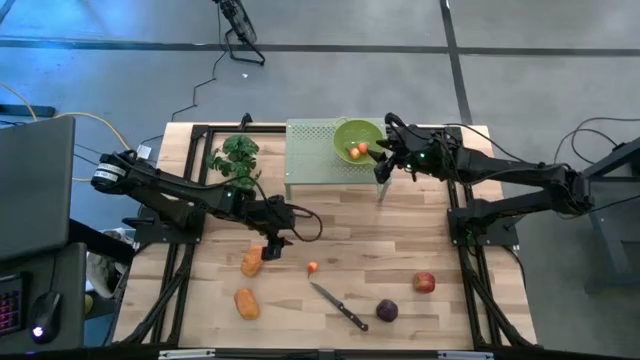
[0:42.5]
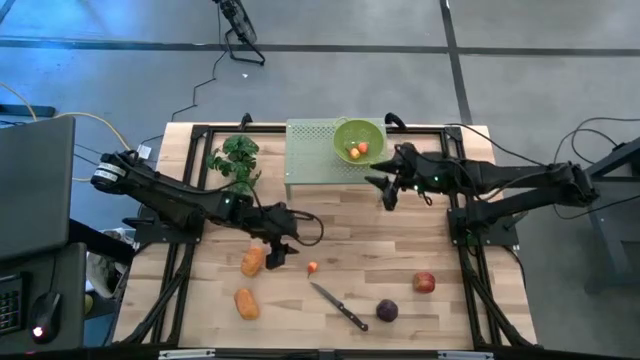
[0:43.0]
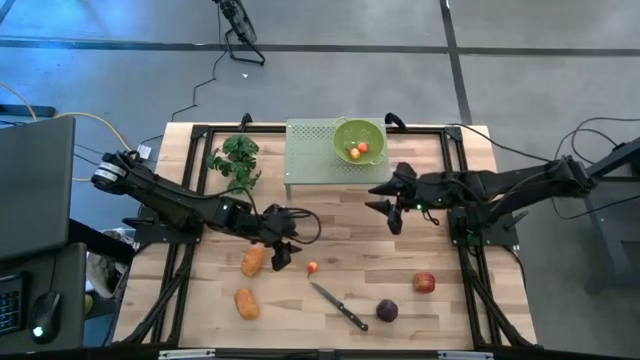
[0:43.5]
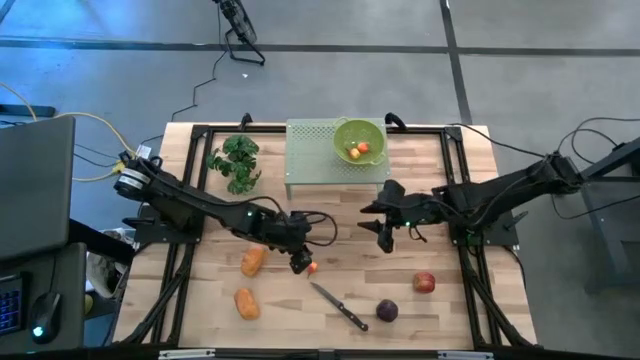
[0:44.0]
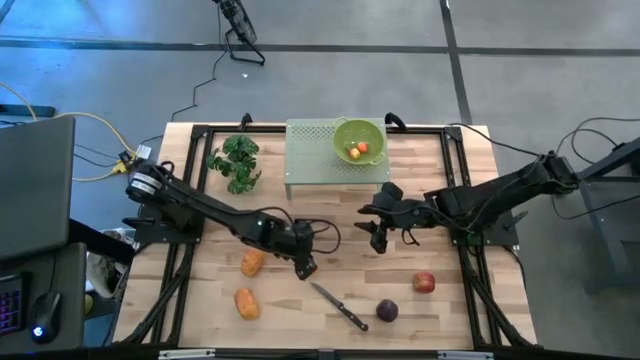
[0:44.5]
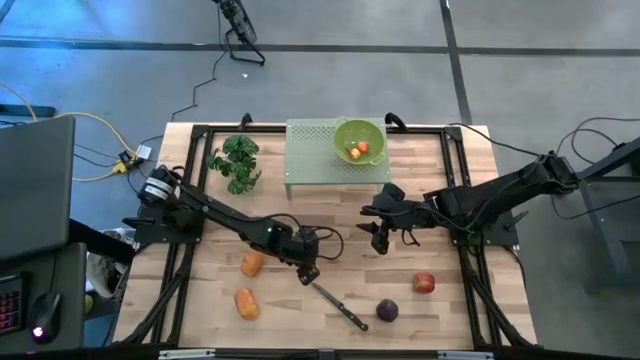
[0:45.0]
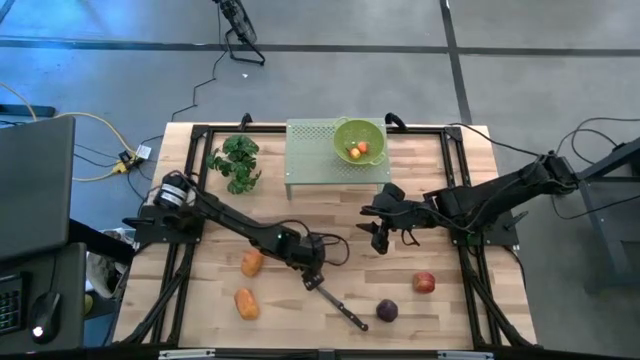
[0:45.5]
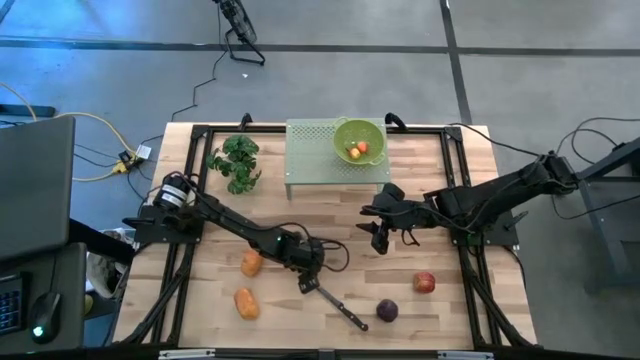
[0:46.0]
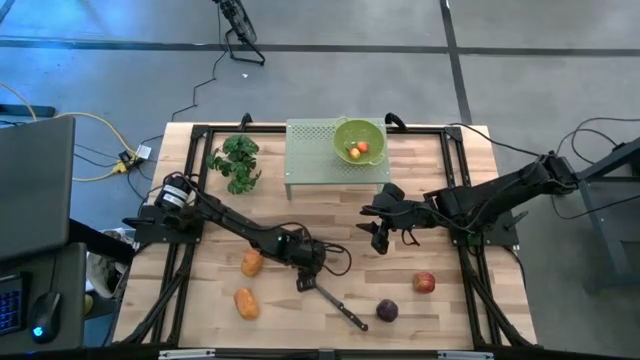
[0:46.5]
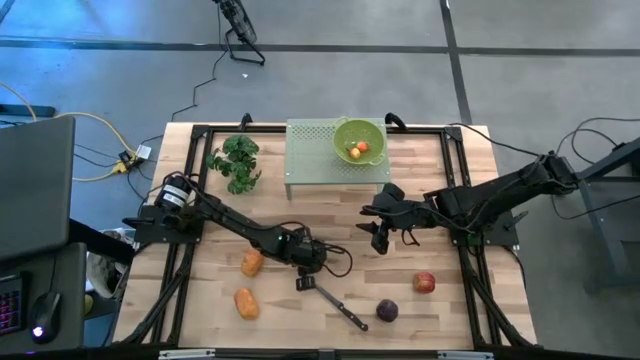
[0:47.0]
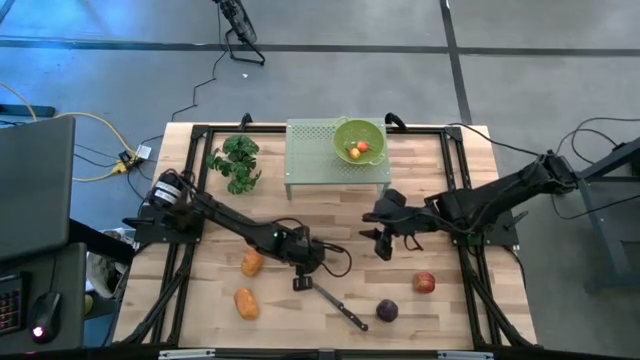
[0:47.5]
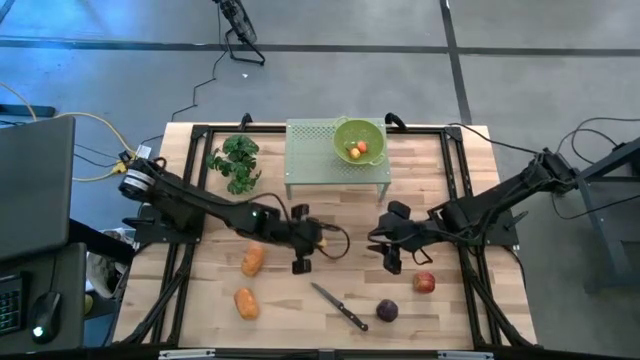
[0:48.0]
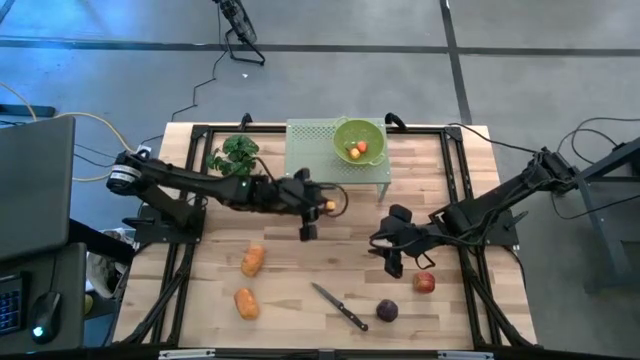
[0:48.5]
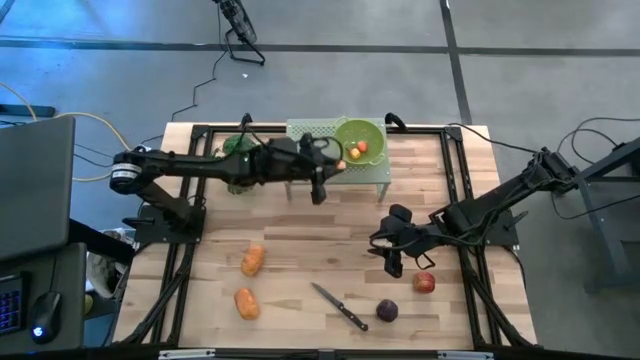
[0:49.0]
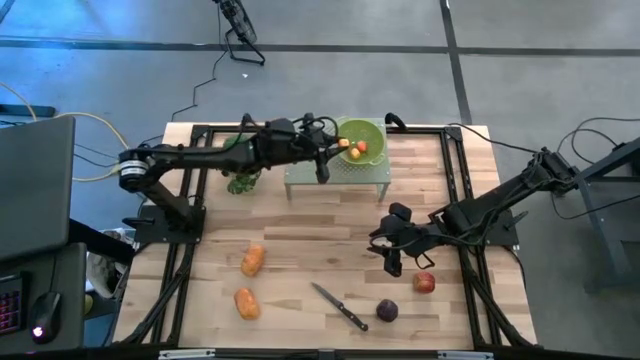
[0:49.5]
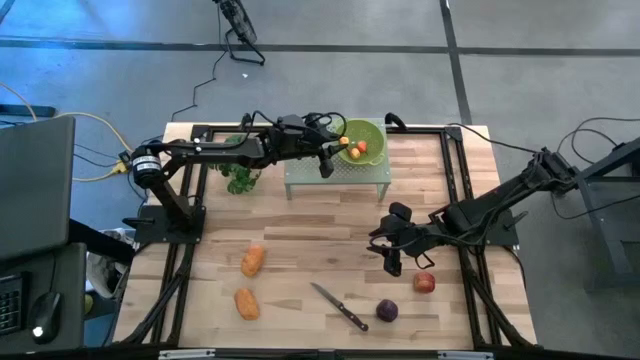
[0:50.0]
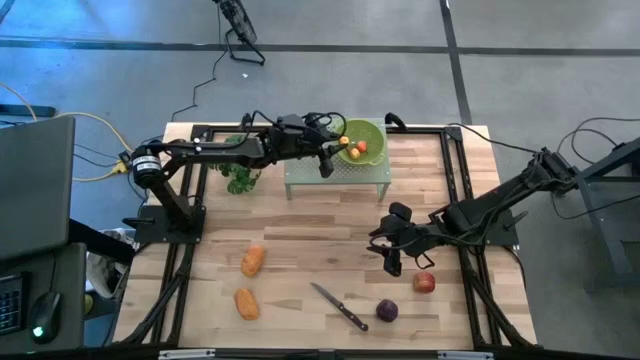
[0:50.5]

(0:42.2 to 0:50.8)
Task: Pick & Place Fruit
Put the orange pear inside the green strainer bowl on the top shelf

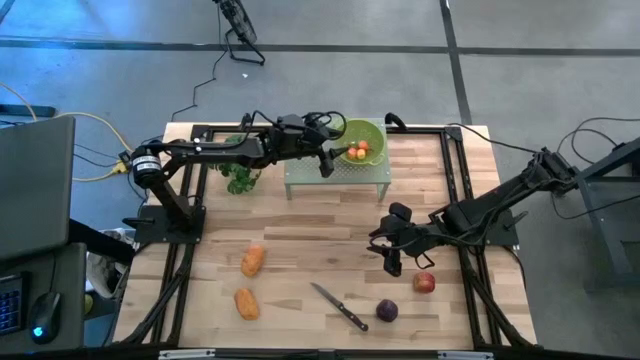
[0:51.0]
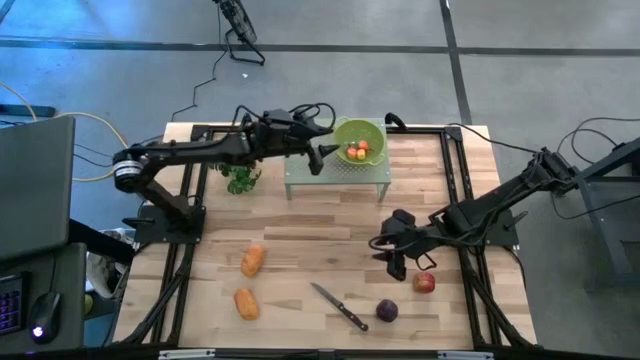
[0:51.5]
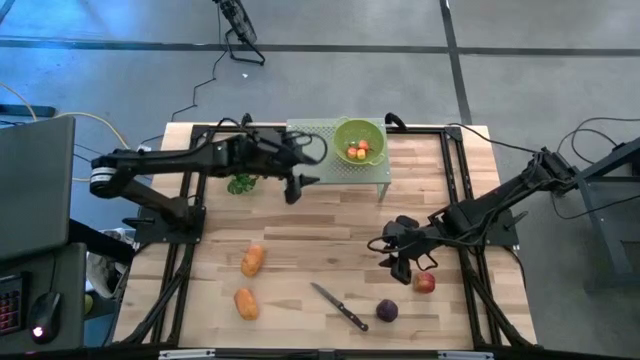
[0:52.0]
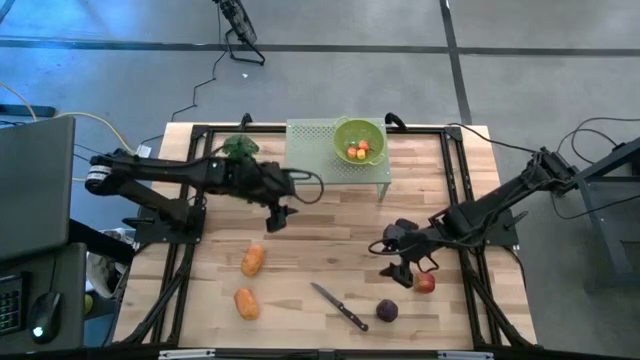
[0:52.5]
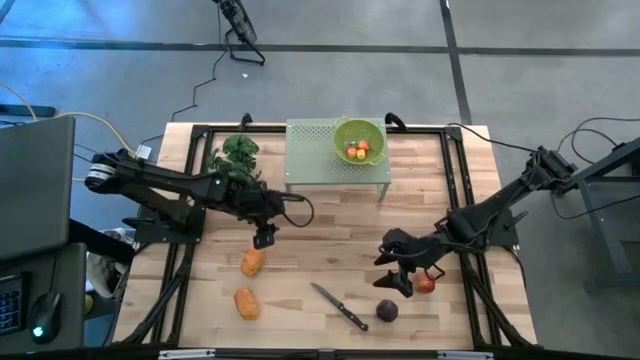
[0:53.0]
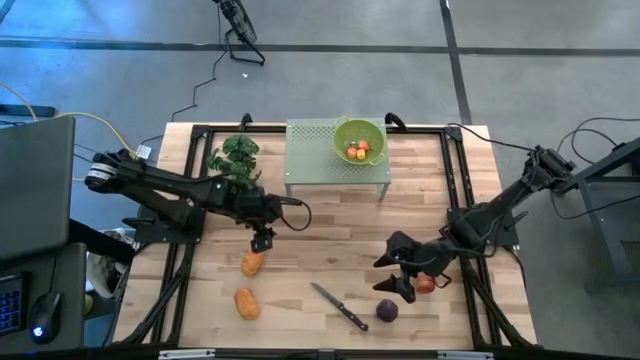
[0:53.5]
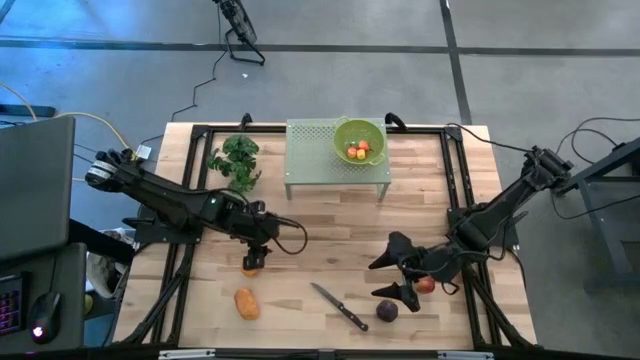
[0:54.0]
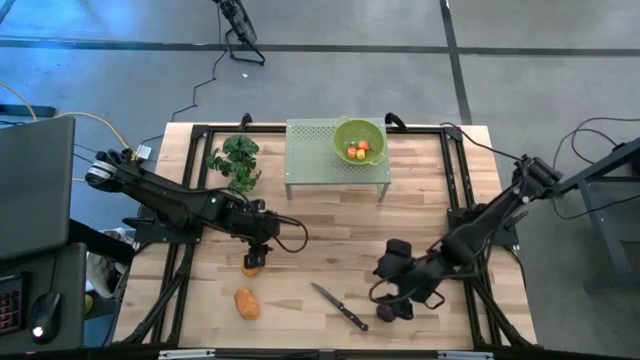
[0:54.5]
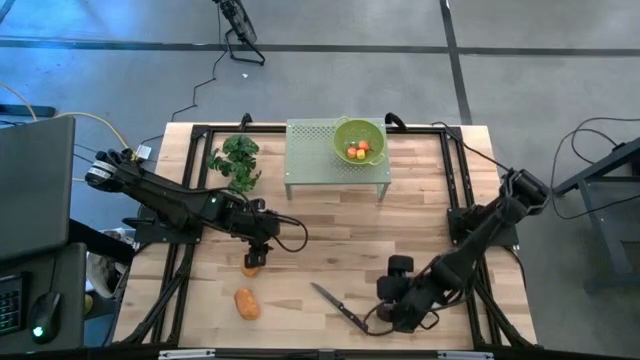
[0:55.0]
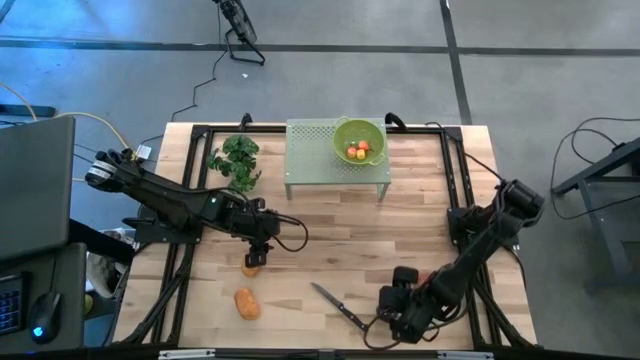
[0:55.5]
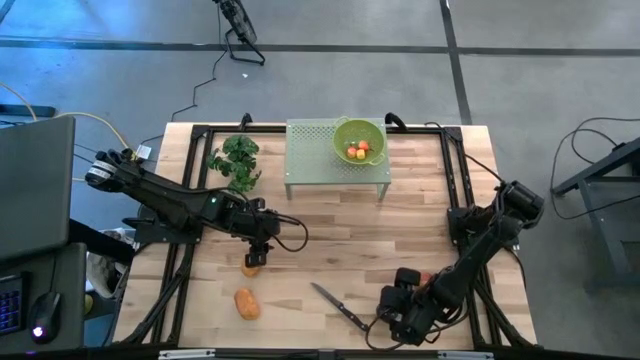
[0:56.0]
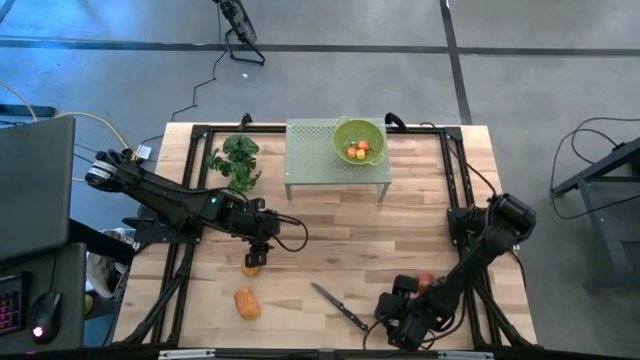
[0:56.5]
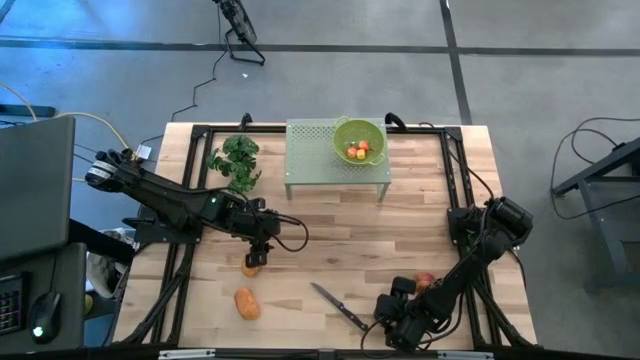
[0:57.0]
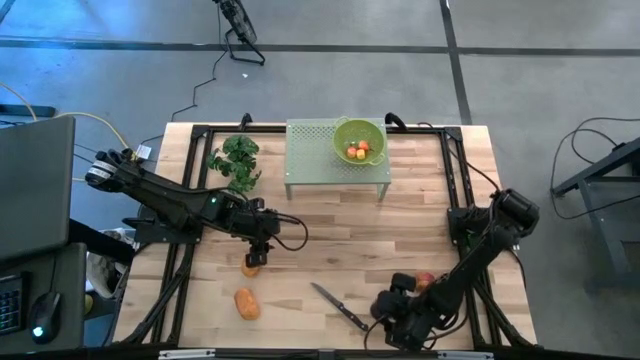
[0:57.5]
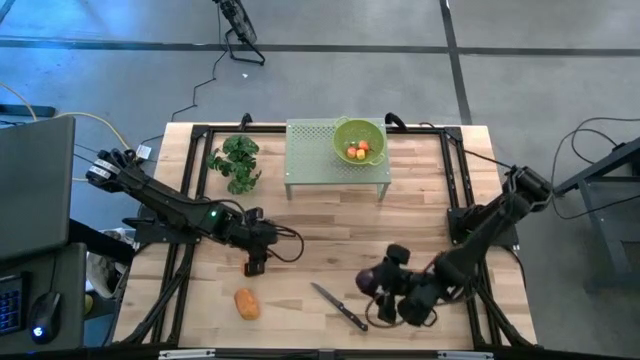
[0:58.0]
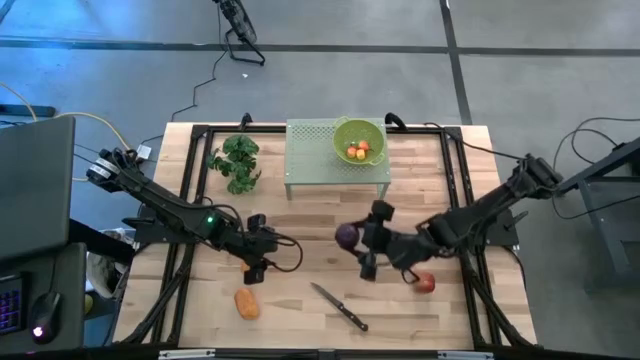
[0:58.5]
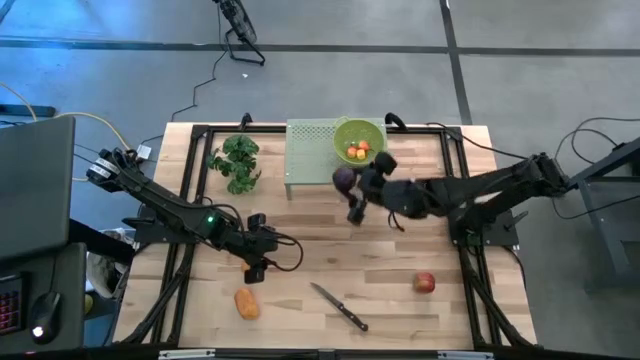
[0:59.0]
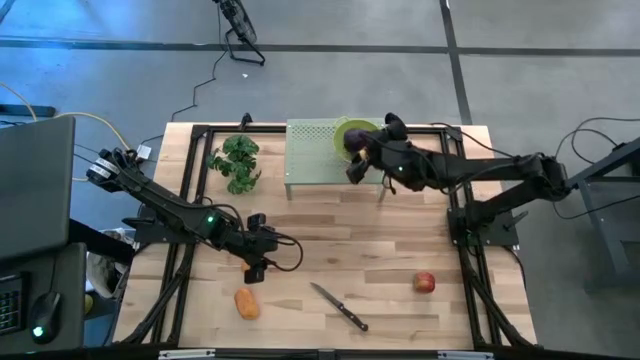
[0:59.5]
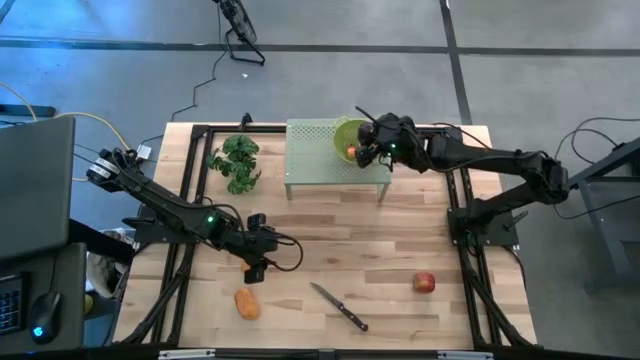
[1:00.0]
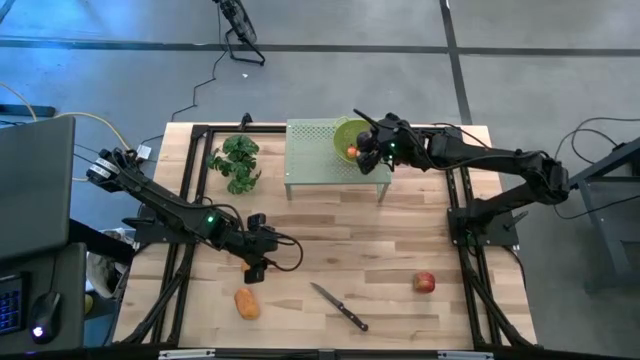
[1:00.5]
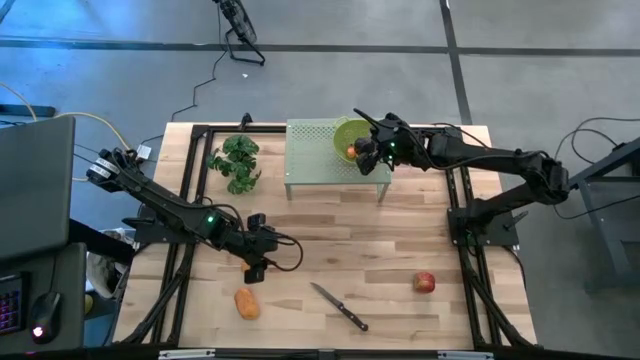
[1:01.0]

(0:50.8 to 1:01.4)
Put the black plum into the green strainer bowl on the top shelf

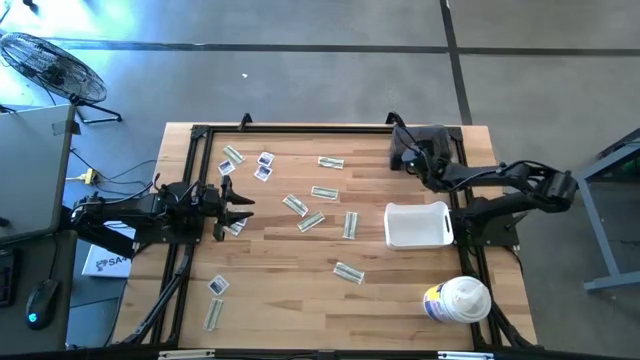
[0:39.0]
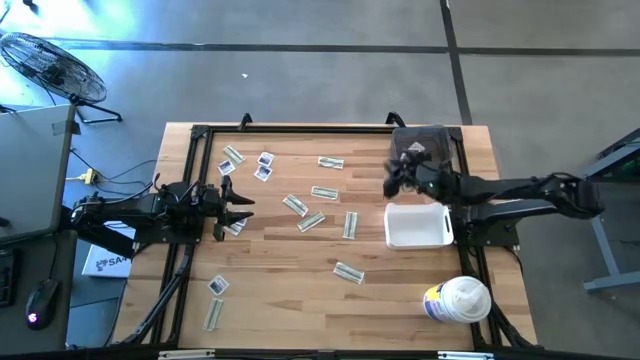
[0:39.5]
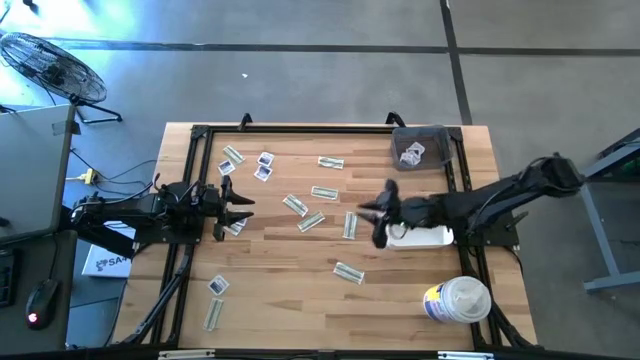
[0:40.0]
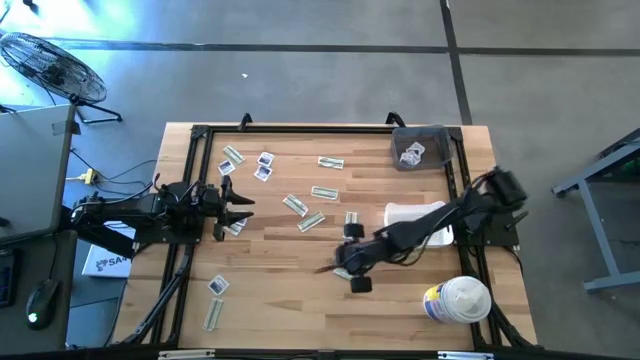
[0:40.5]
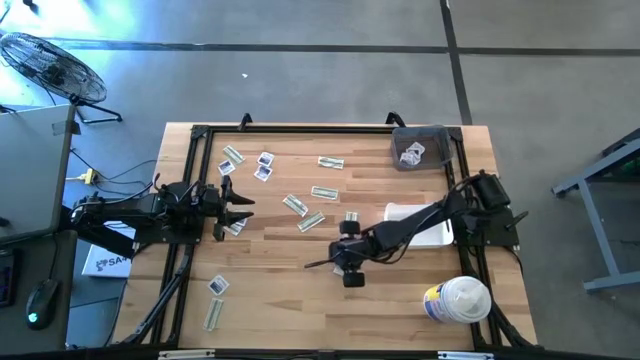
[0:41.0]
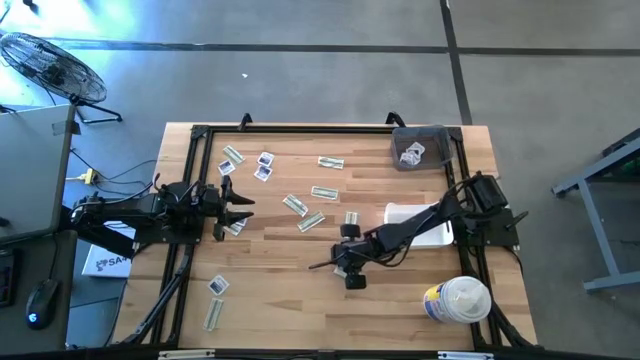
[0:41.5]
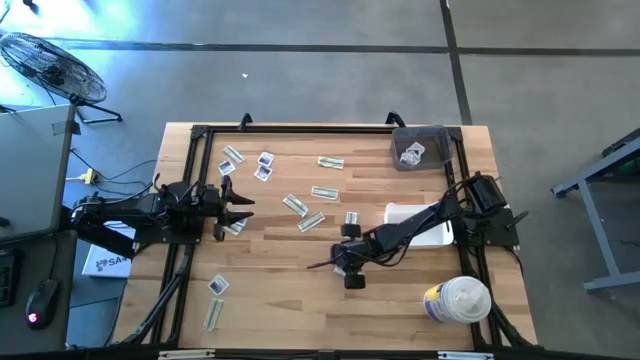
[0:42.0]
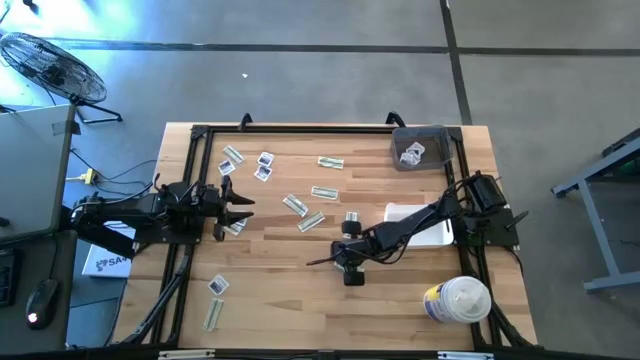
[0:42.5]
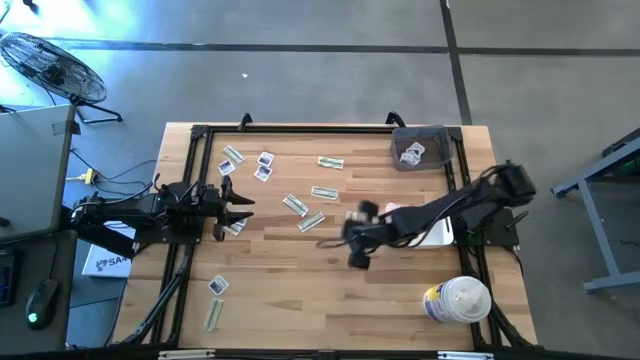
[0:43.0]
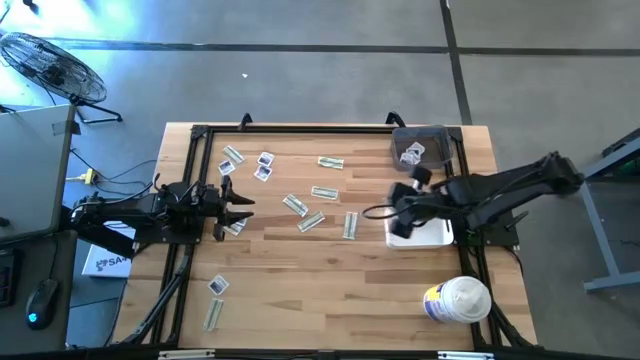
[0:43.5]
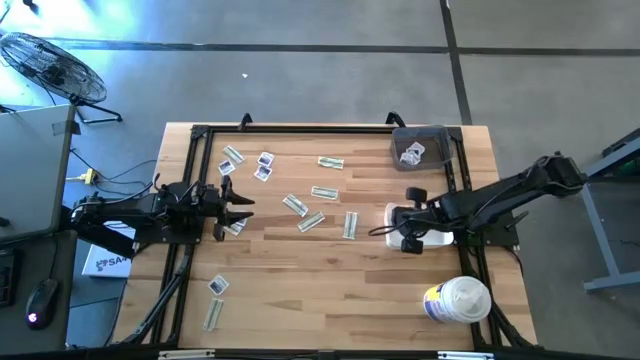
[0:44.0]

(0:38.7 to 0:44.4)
Task: Pick & Place First Aid Supplies
Put the bandage into the white bin
